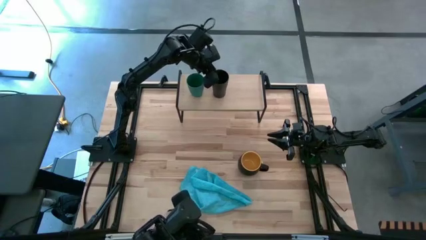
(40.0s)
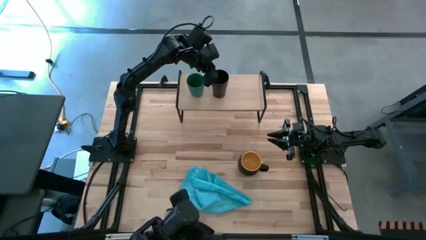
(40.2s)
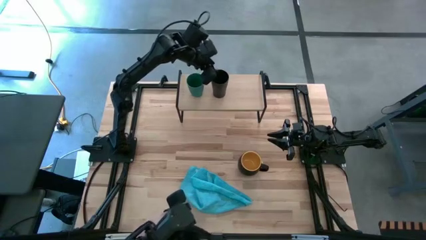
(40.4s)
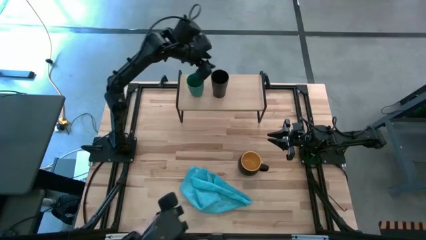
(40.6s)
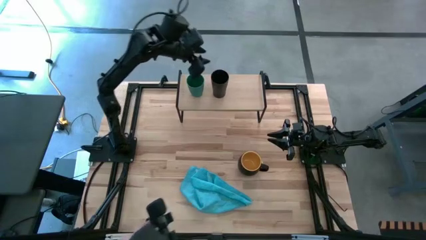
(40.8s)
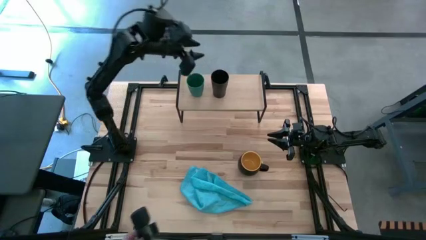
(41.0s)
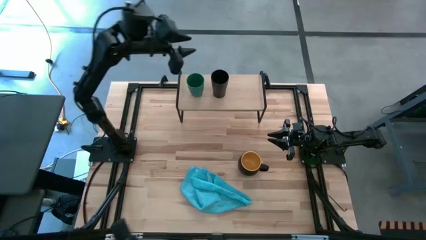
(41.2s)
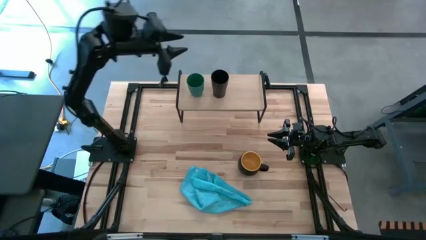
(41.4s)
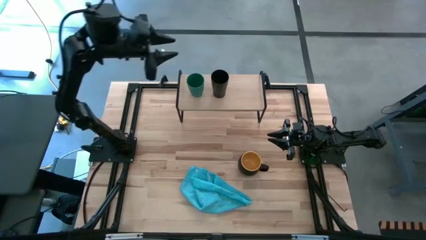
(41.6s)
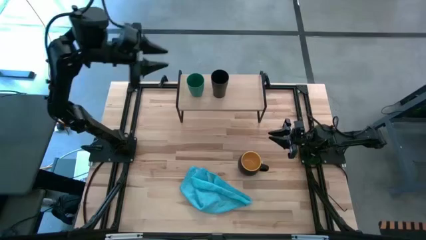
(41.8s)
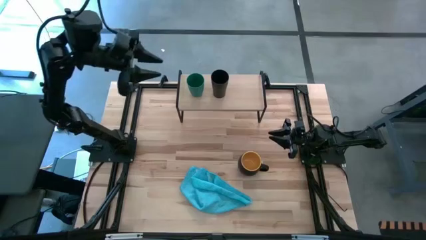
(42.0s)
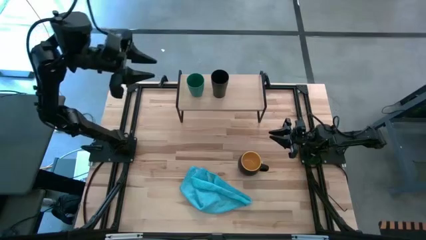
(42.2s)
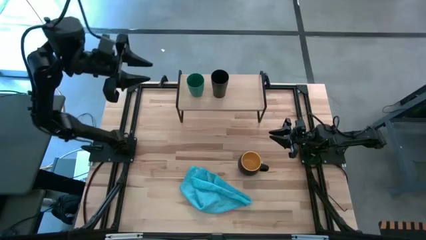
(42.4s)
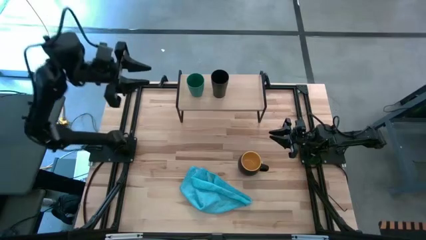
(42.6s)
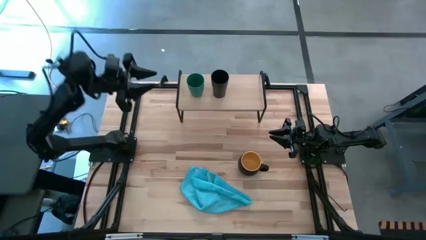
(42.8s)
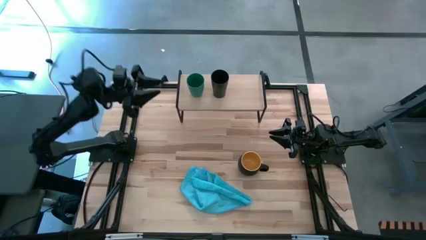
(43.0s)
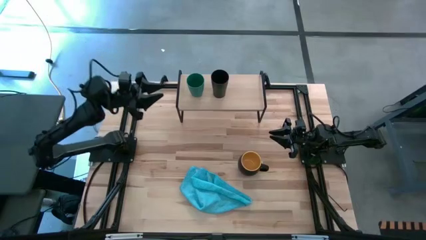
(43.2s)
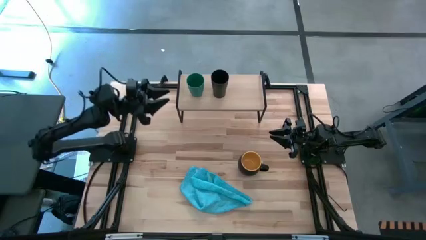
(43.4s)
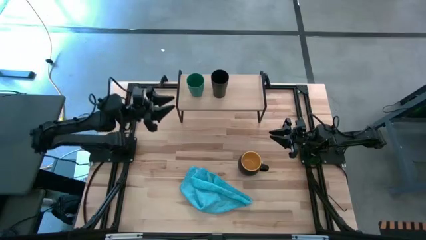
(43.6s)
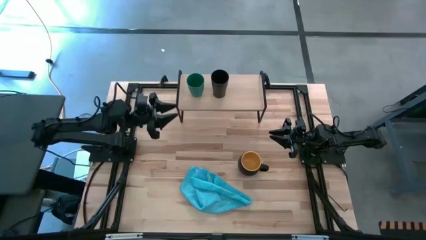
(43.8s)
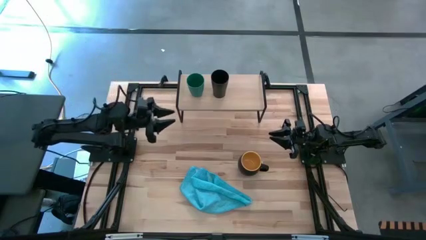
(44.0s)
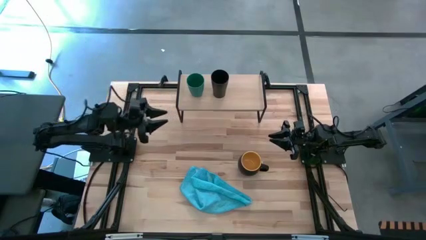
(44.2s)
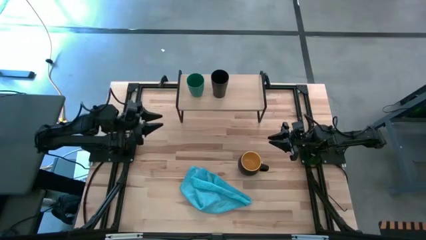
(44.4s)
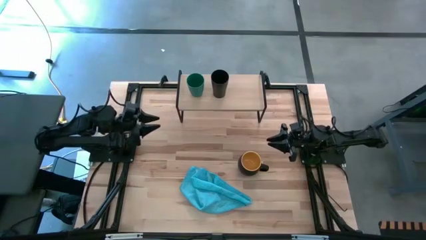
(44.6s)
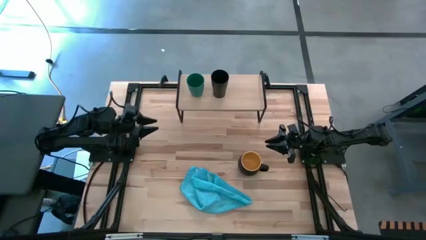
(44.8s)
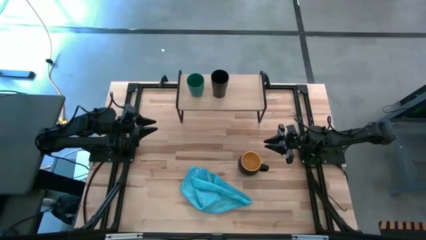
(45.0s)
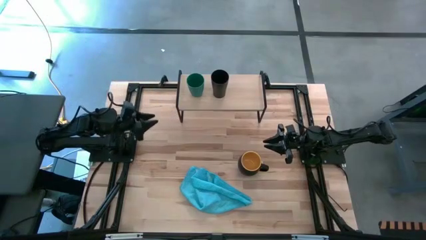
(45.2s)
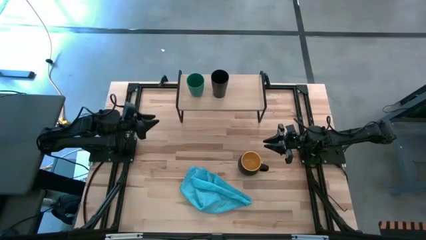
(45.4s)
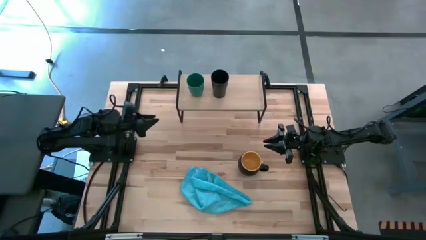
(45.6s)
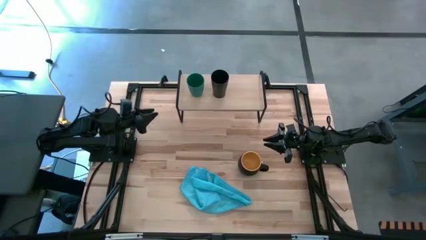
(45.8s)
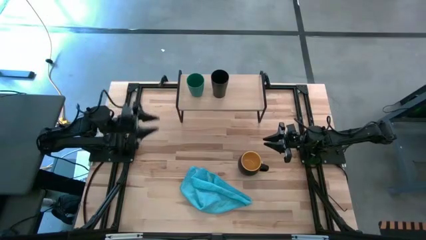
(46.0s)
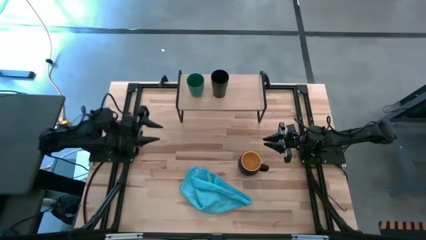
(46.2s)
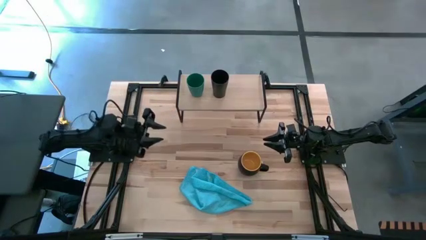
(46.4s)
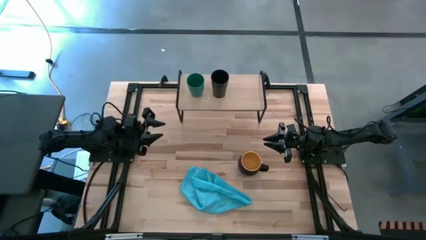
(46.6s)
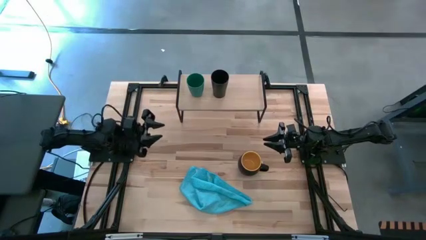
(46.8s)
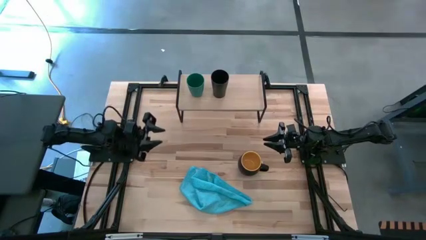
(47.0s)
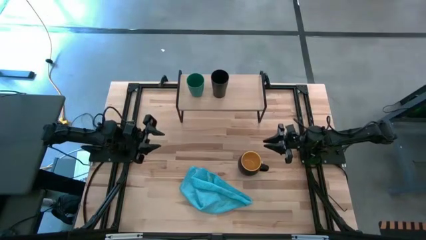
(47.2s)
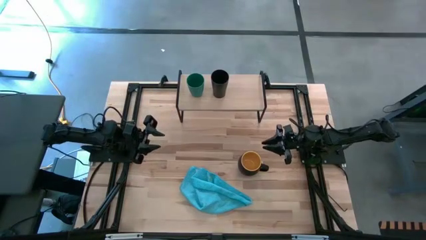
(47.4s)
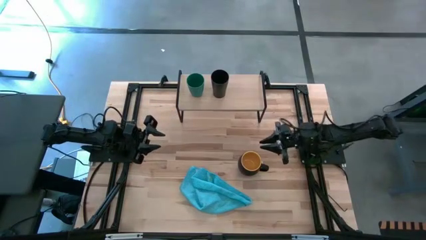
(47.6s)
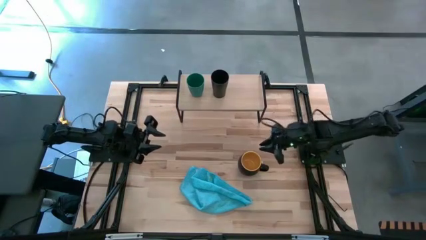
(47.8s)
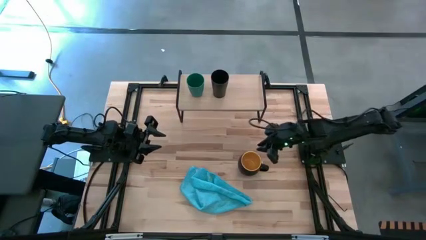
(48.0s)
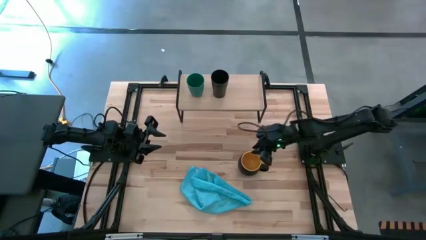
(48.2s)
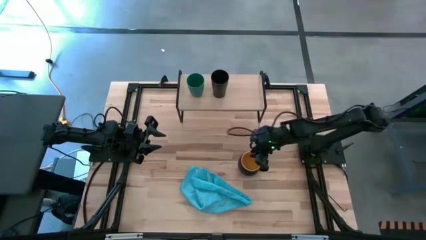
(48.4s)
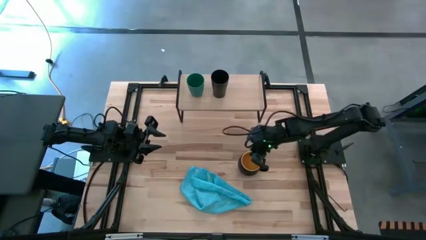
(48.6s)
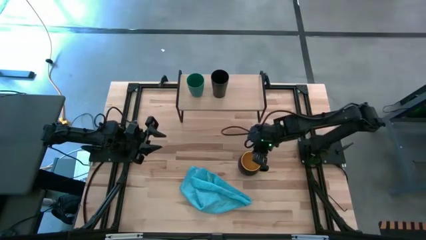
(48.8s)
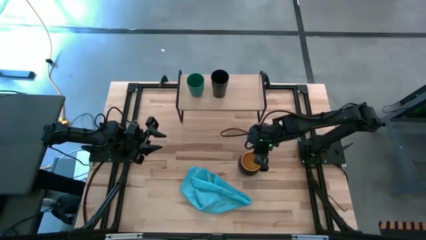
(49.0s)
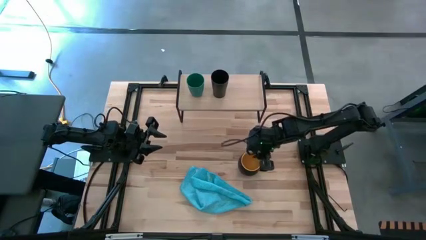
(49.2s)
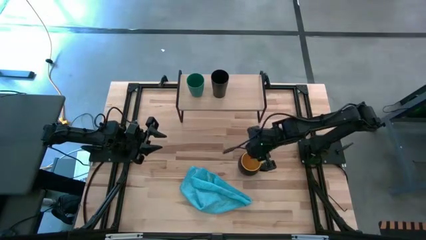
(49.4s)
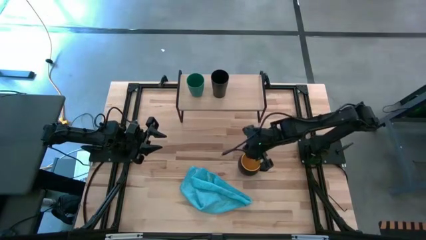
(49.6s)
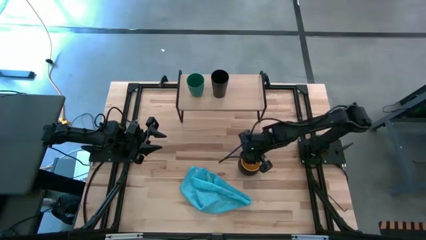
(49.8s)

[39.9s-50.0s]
Task: Stack small to large cups/mugs on shelf
Put the black mug on the shelf

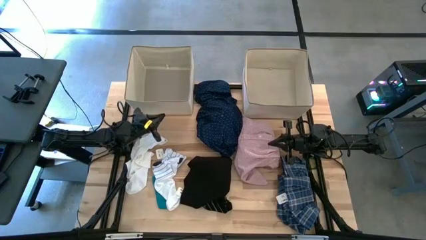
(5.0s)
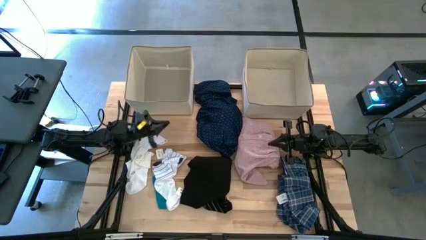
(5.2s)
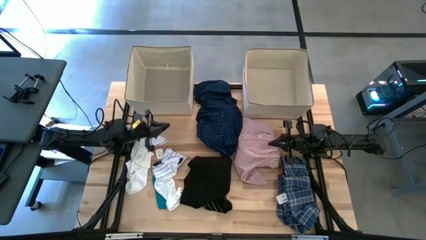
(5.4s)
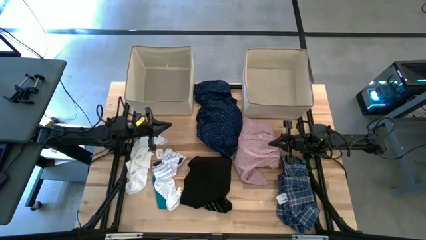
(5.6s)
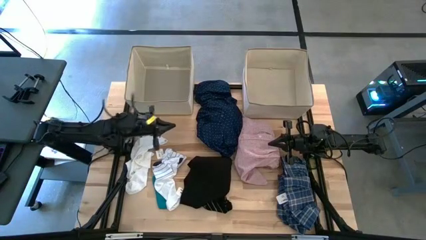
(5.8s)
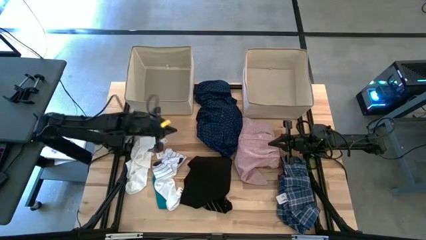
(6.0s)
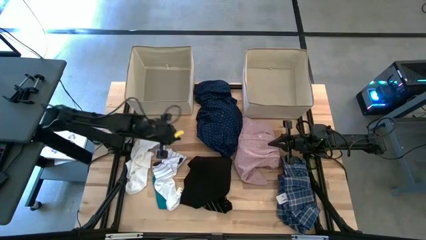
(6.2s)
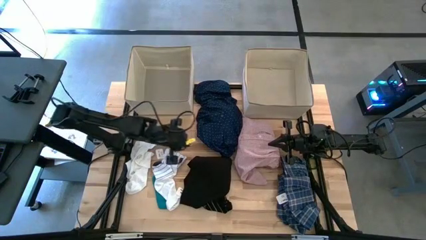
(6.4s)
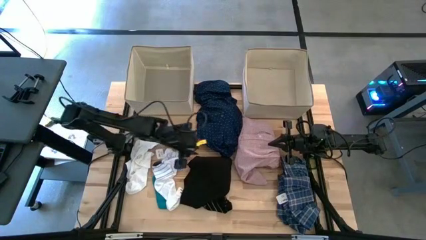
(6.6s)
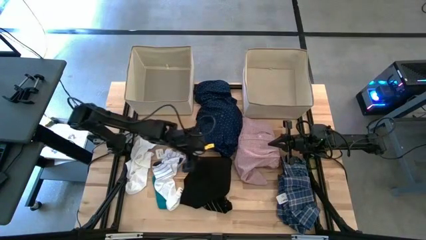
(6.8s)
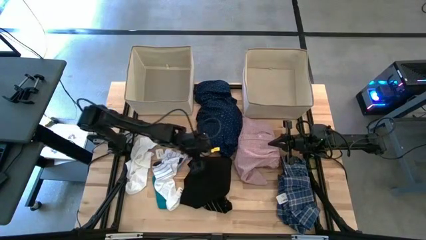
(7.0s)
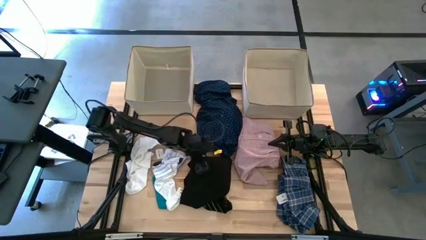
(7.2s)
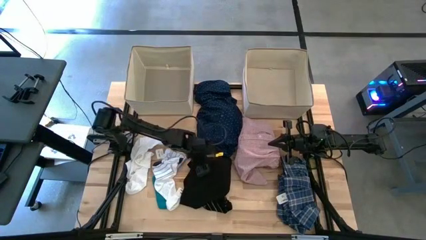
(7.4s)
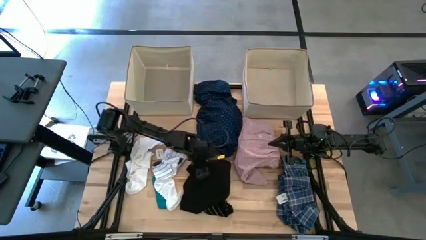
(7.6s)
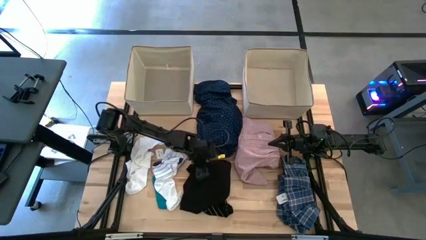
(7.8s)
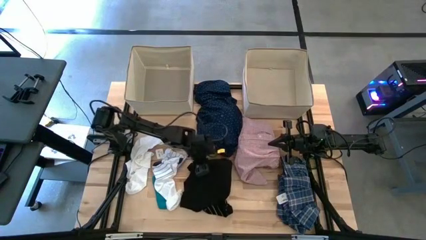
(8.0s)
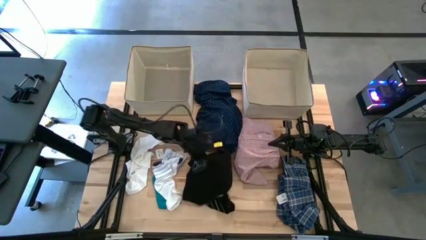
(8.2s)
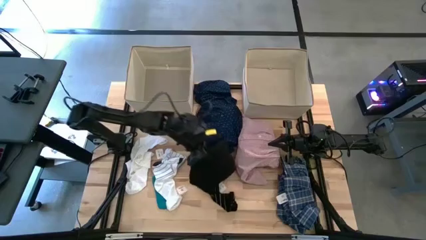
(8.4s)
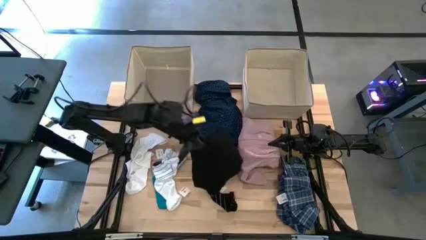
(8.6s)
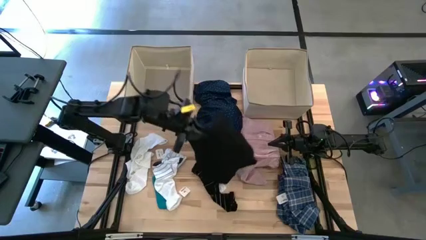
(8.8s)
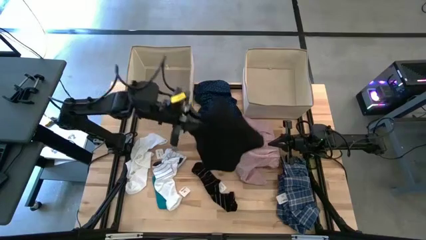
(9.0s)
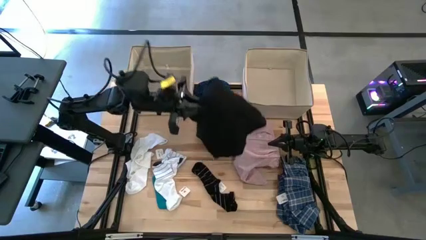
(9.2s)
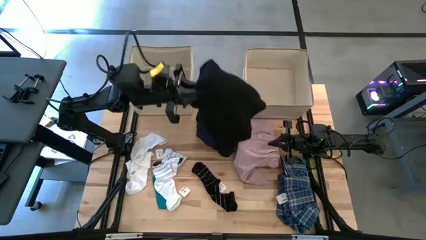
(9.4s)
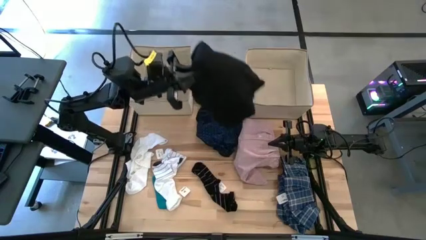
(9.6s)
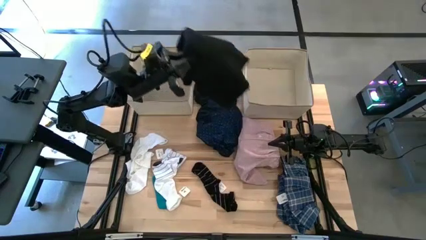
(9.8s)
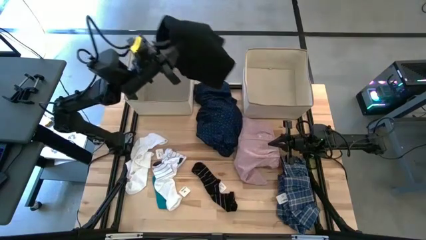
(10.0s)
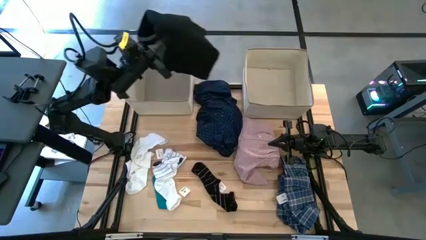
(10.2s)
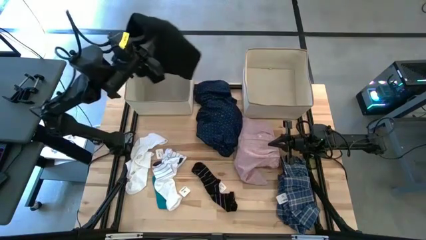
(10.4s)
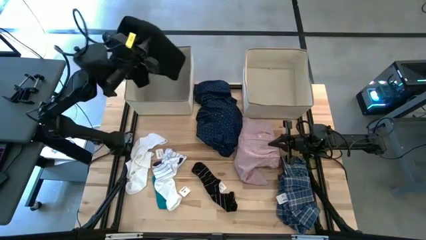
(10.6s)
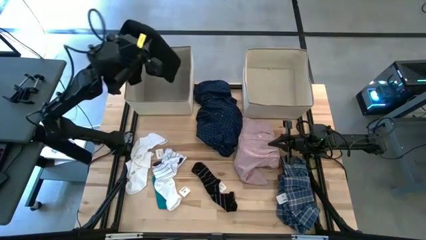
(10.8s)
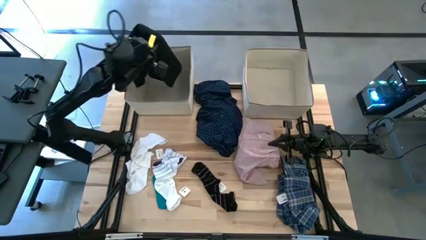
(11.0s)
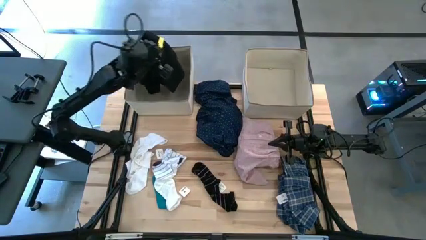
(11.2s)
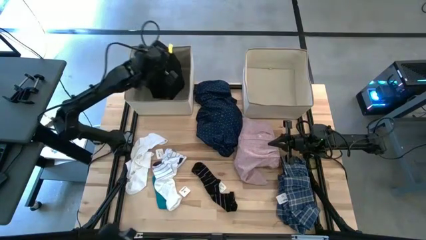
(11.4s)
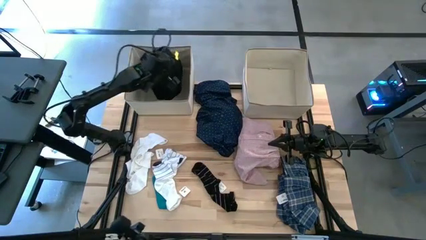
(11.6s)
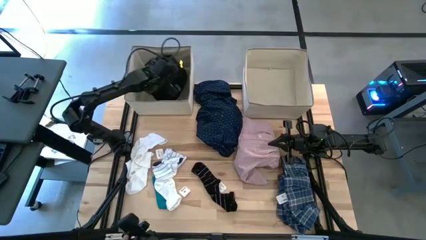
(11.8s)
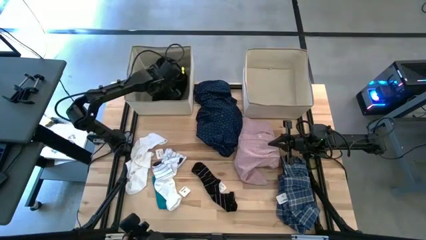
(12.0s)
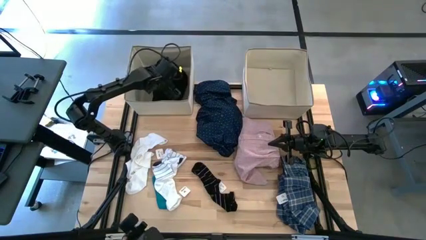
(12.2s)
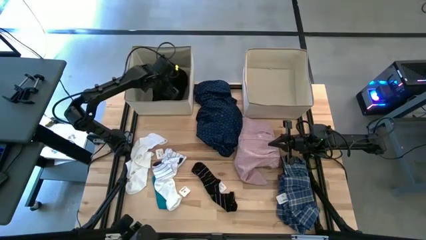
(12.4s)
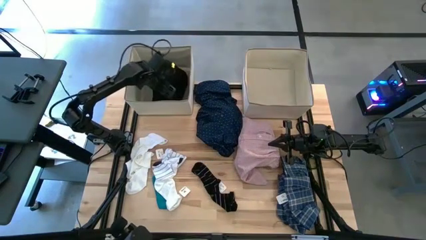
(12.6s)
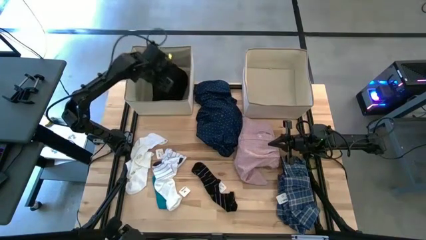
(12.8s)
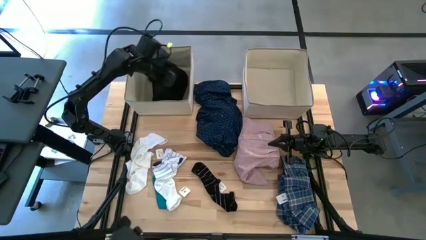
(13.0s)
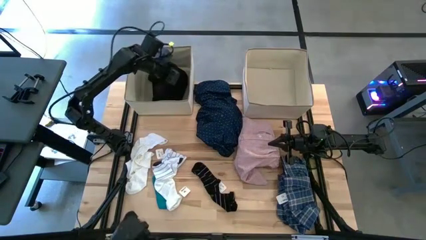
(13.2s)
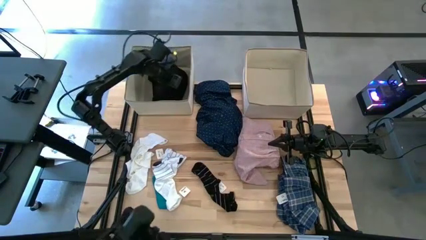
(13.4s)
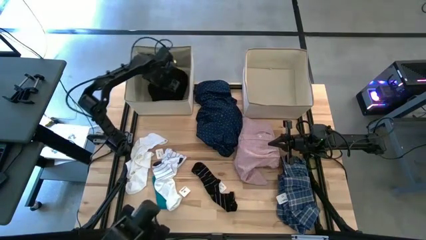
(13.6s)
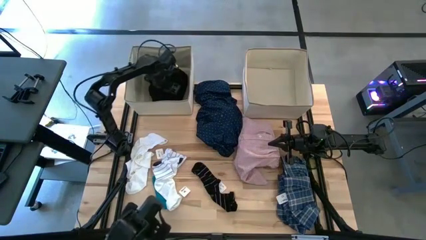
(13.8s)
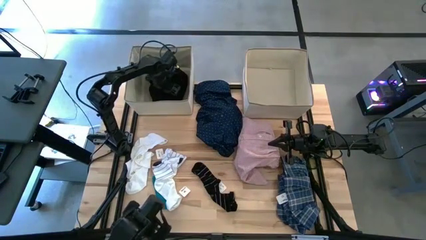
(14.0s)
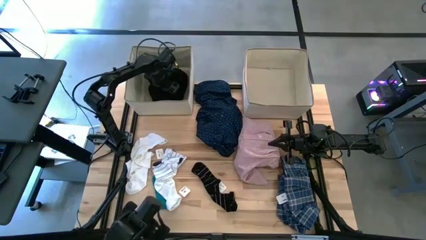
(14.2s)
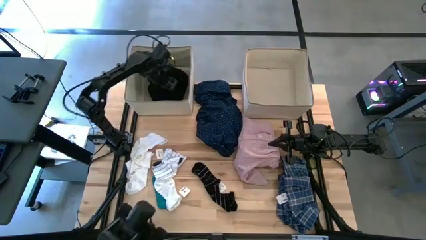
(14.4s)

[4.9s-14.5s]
Task: Sort clothes
Put the black pants into the left laundry organizer
